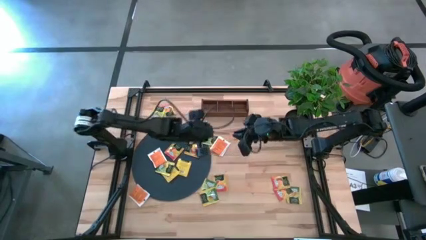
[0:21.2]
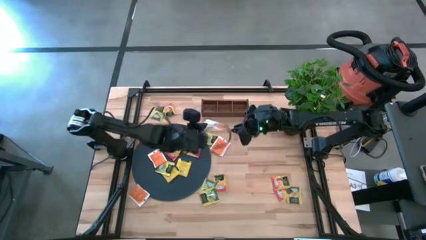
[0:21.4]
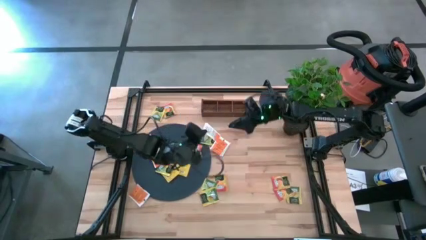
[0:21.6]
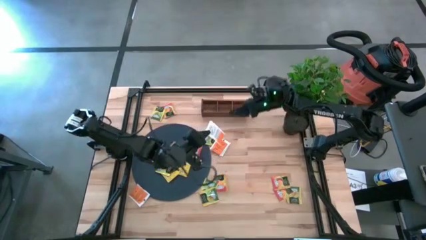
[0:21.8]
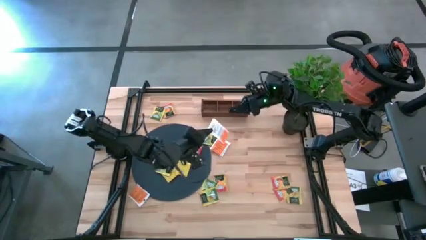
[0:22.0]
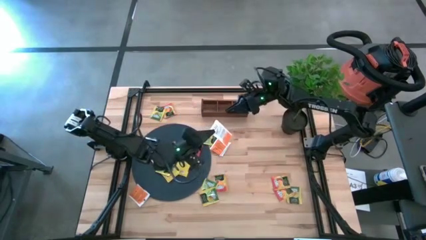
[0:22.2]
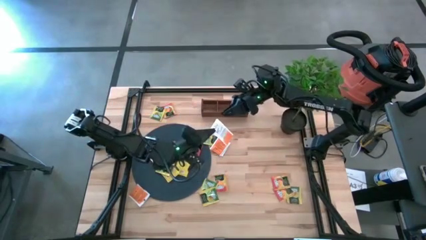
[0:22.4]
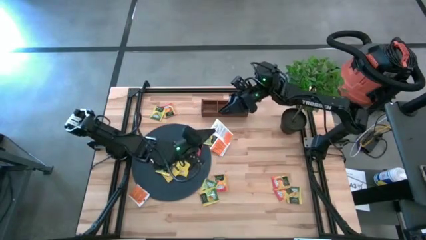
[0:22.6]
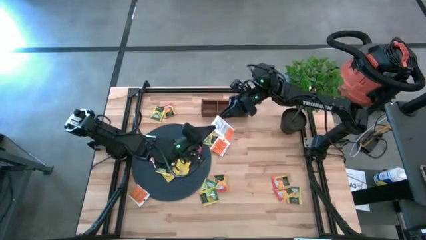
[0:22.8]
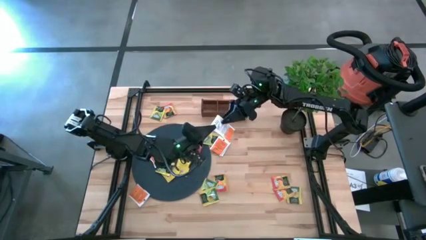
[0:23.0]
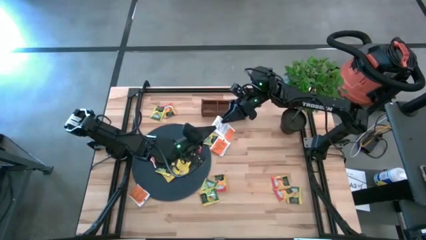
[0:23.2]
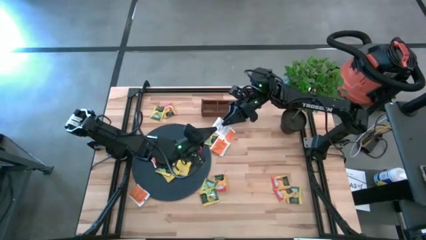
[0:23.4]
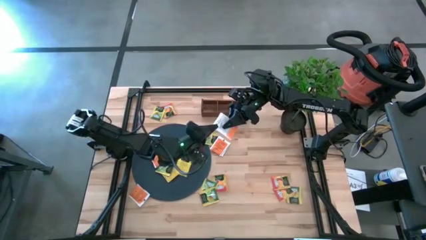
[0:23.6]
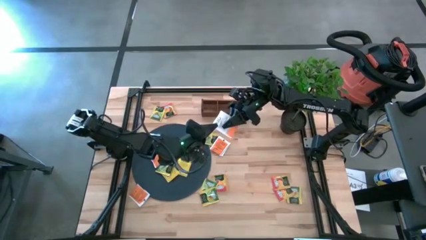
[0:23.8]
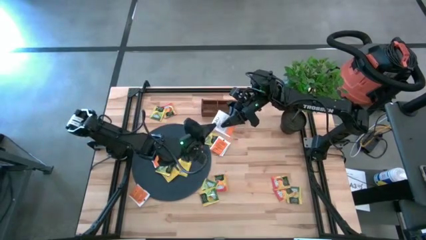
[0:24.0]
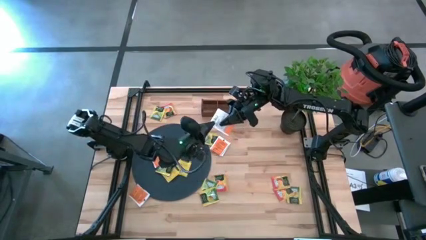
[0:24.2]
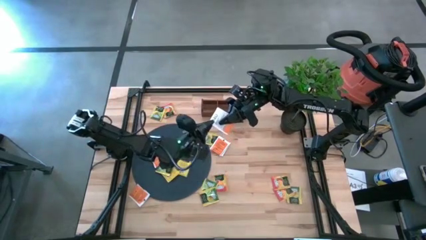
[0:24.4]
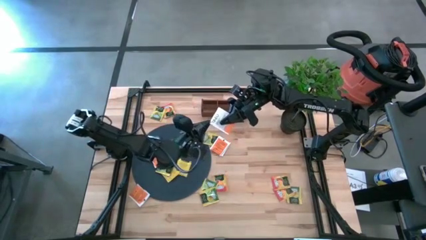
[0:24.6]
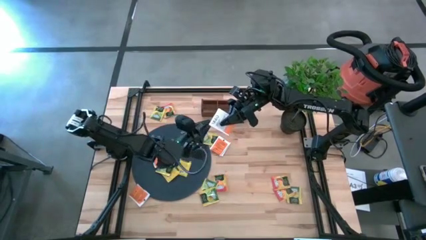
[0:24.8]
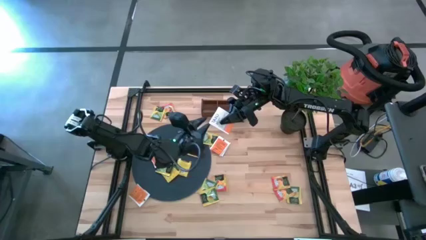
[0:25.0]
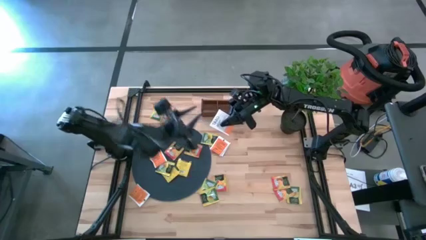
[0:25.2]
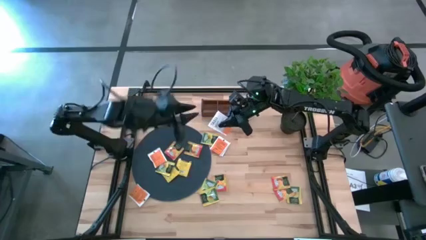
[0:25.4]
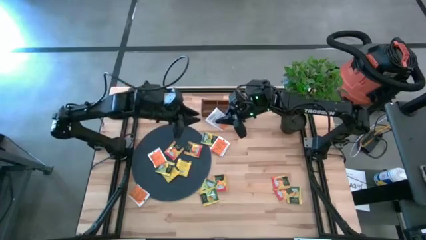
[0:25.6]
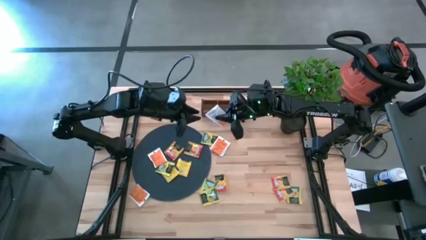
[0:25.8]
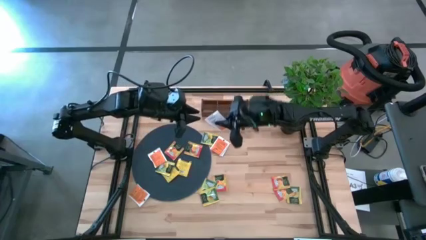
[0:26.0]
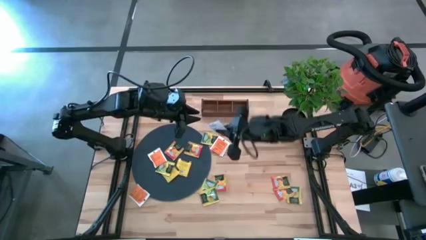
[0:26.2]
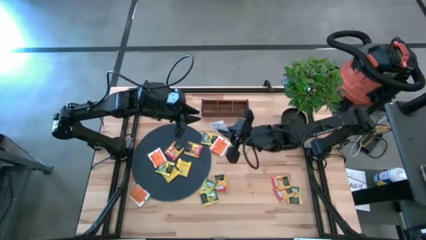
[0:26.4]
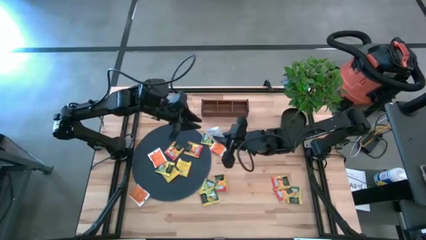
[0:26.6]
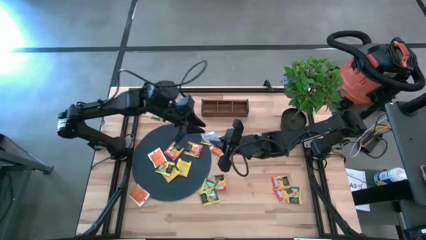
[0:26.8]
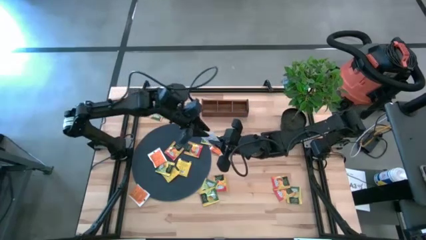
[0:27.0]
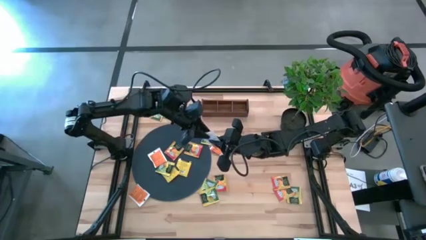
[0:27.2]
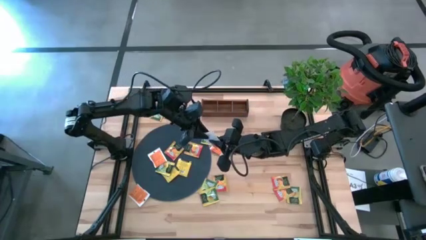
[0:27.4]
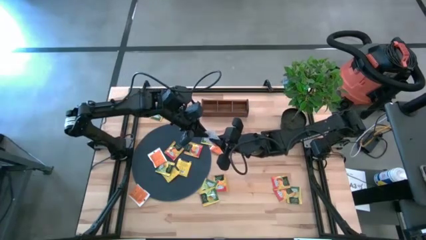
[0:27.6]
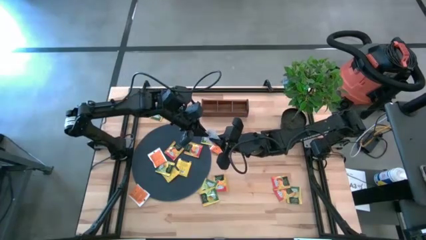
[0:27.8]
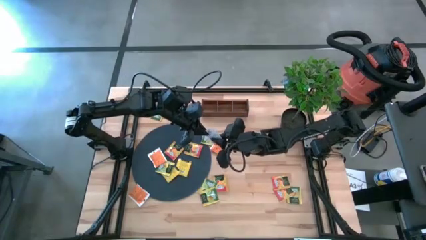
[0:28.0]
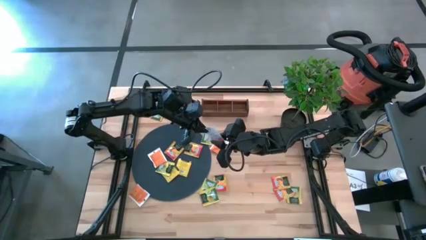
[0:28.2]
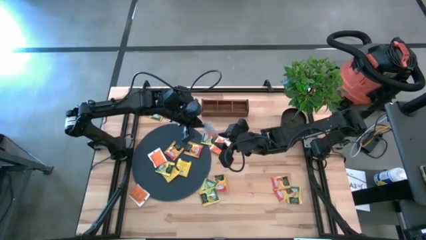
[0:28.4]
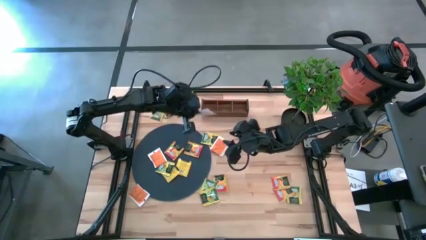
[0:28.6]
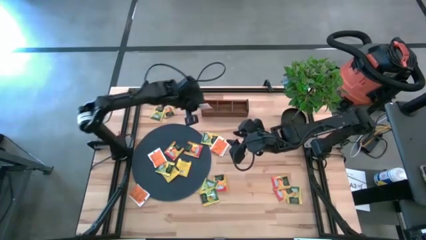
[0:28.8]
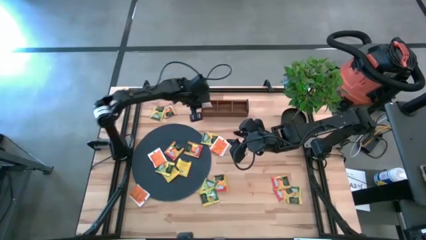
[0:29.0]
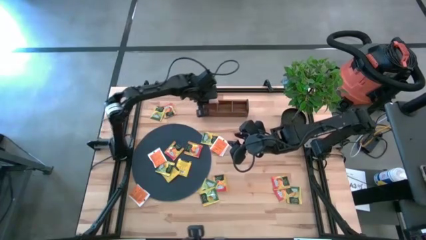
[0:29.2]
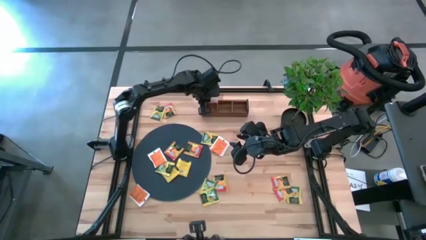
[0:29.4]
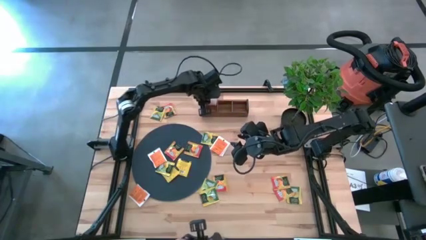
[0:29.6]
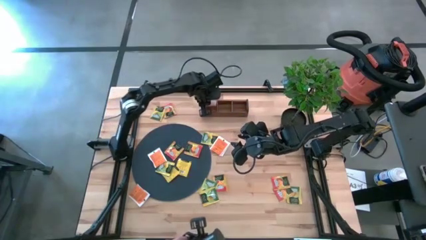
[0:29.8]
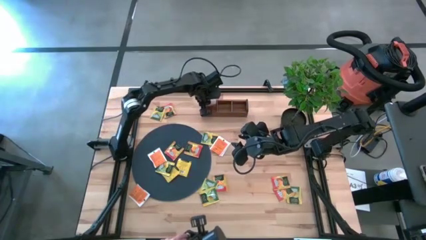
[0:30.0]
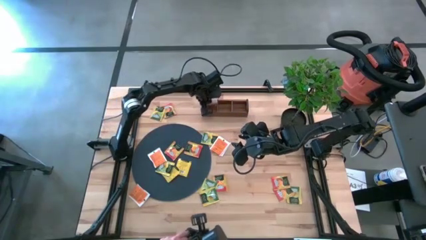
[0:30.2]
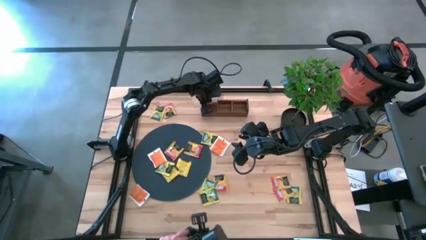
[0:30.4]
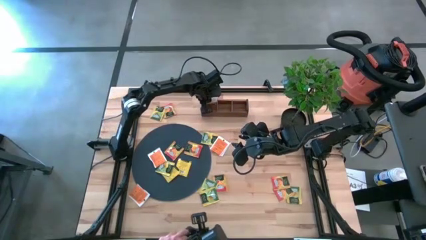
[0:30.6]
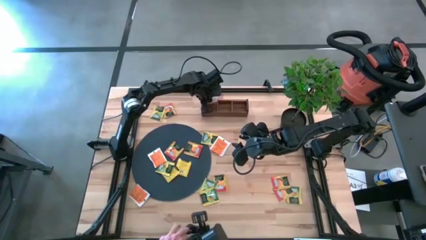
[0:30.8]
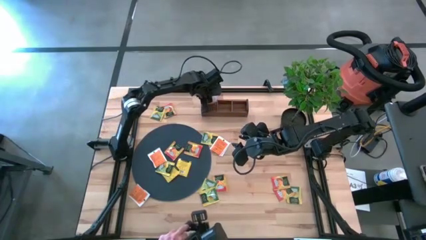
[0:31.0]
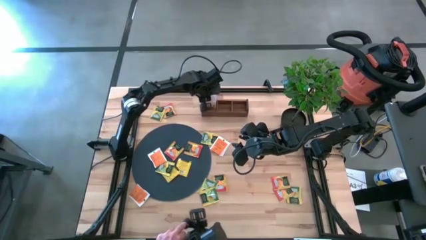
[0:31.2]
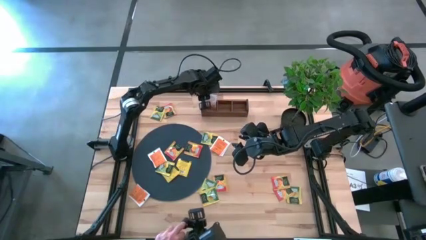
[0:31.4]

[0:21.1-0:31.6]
Task: Pick & Place Tea
Put the orange tea bag into the left section of the wooden organizer

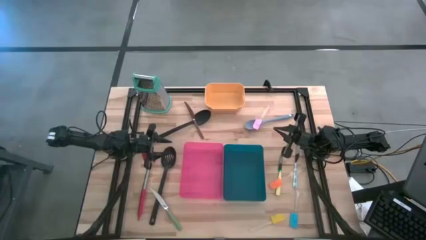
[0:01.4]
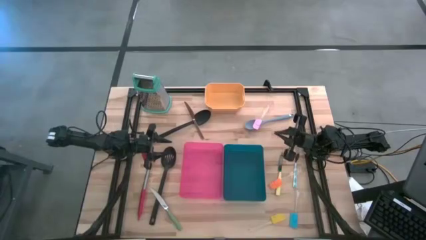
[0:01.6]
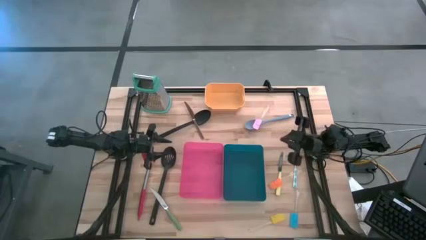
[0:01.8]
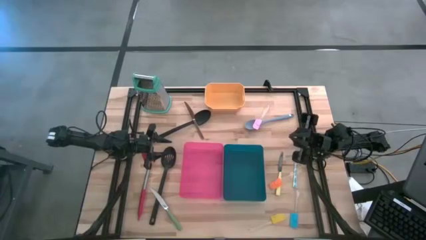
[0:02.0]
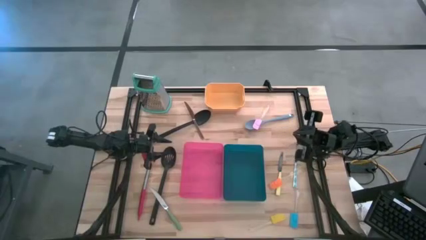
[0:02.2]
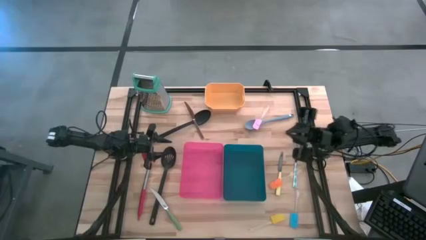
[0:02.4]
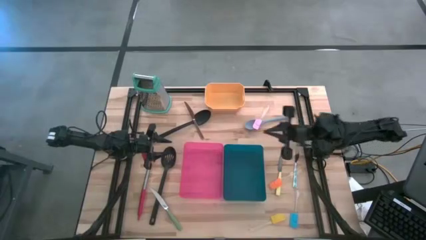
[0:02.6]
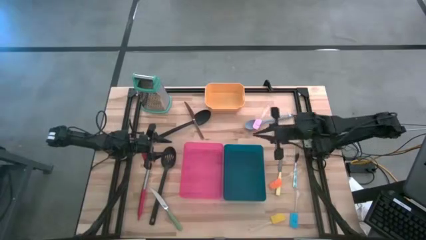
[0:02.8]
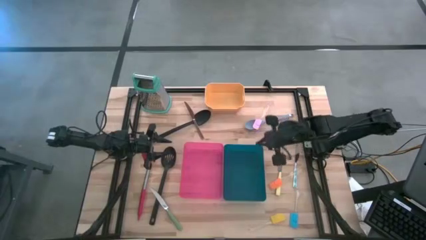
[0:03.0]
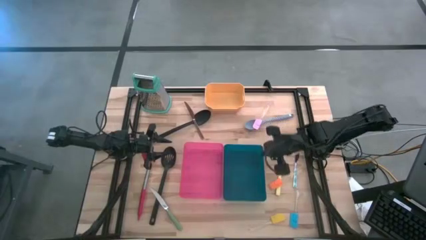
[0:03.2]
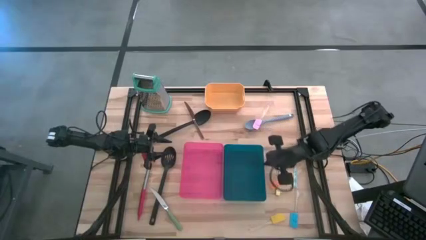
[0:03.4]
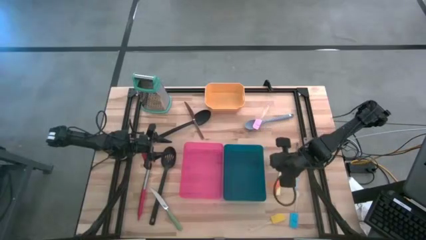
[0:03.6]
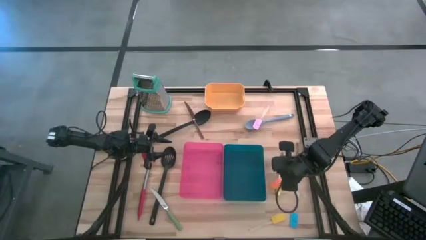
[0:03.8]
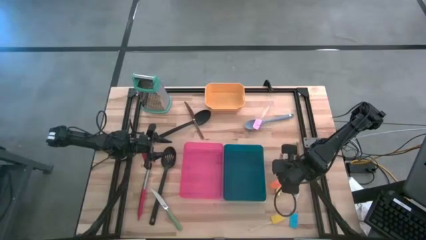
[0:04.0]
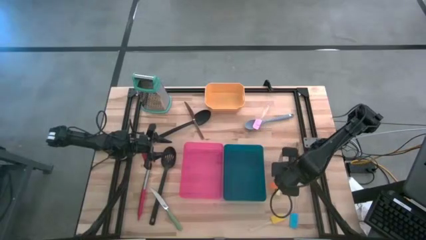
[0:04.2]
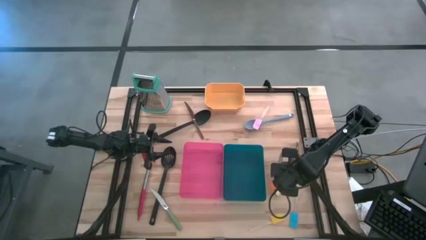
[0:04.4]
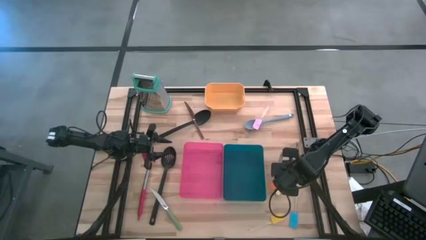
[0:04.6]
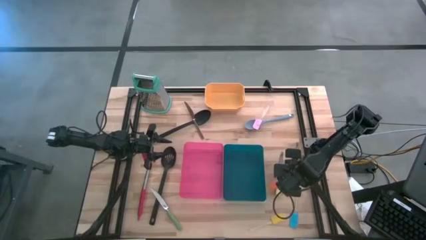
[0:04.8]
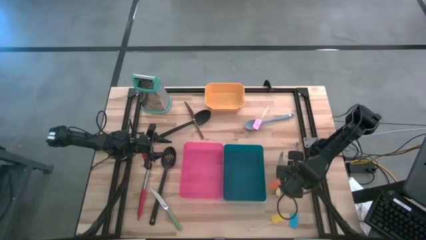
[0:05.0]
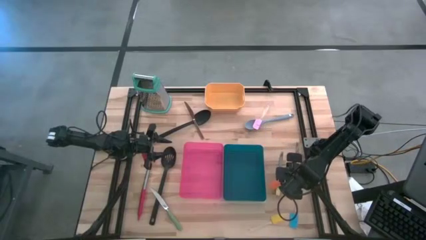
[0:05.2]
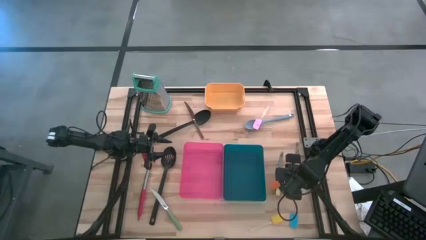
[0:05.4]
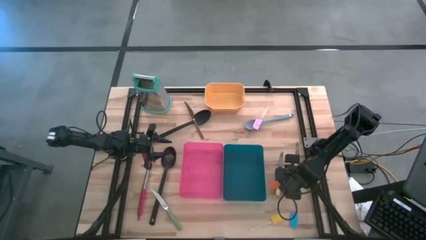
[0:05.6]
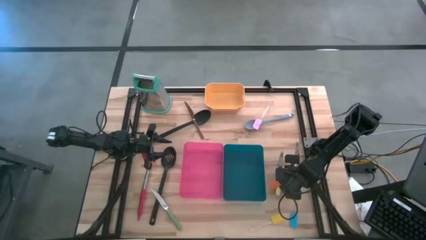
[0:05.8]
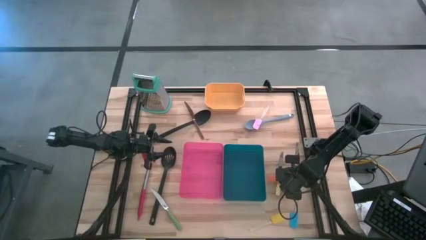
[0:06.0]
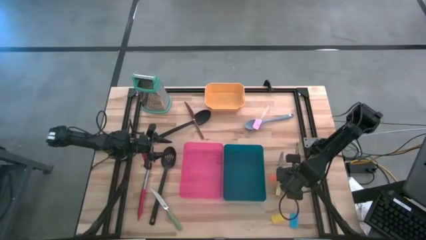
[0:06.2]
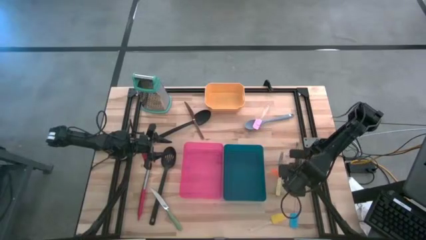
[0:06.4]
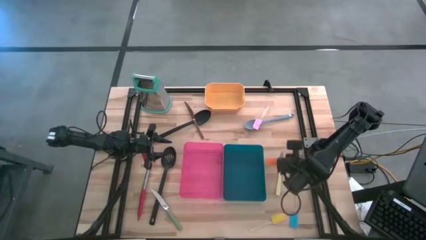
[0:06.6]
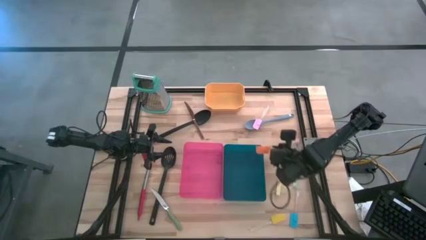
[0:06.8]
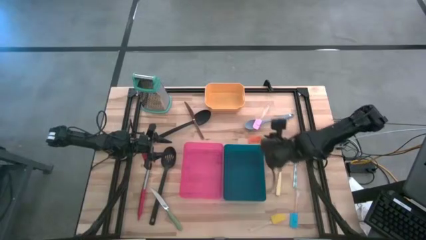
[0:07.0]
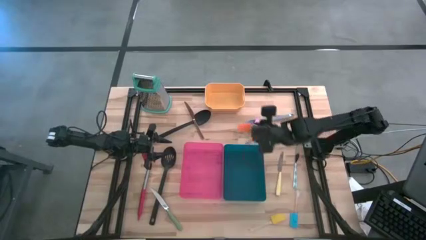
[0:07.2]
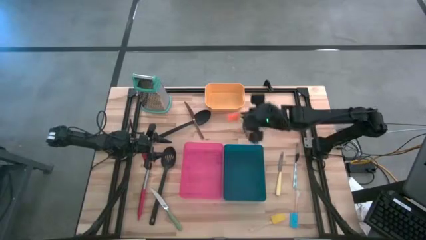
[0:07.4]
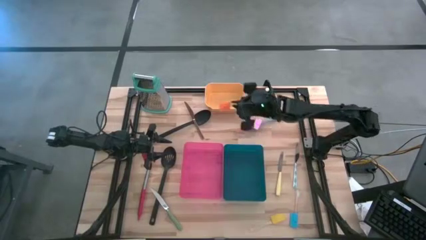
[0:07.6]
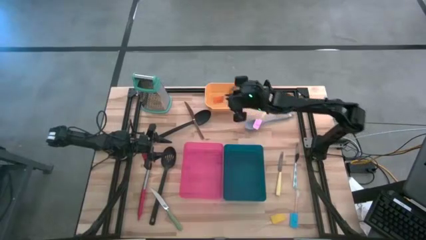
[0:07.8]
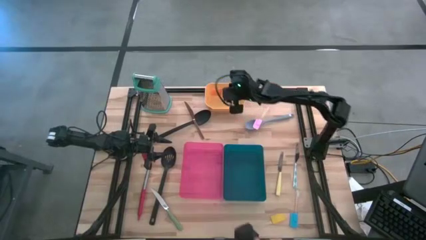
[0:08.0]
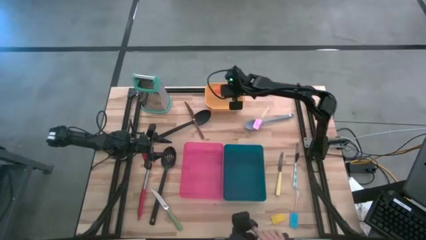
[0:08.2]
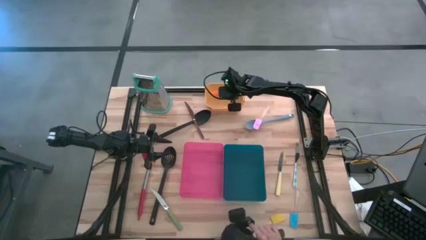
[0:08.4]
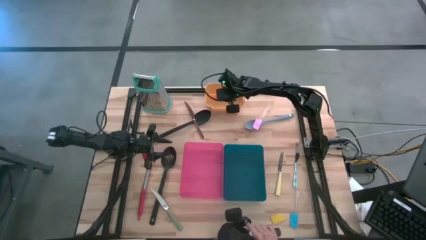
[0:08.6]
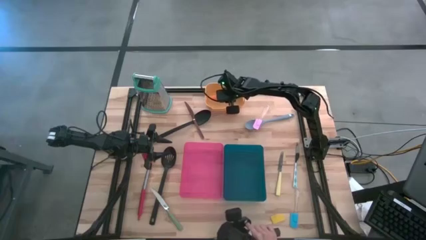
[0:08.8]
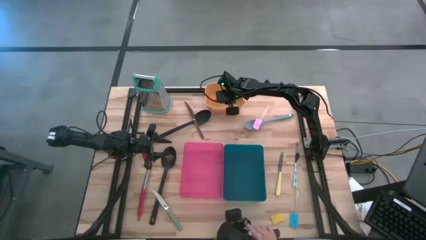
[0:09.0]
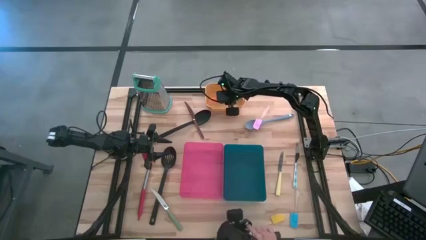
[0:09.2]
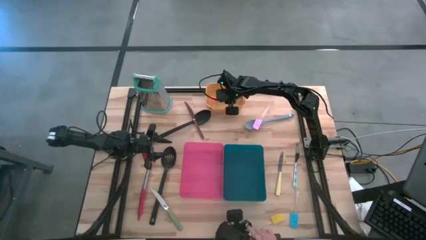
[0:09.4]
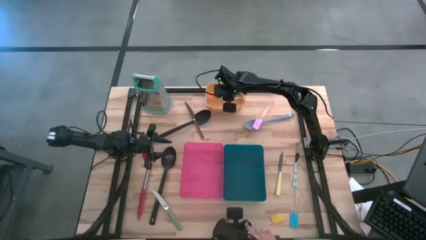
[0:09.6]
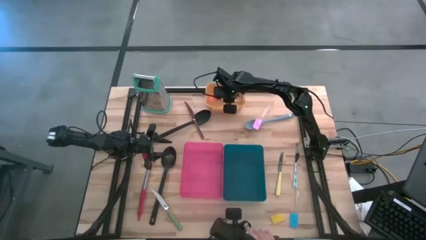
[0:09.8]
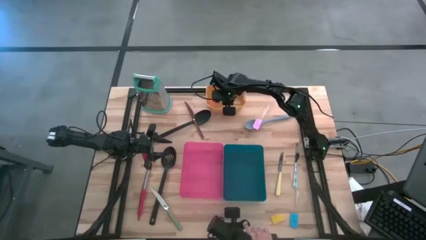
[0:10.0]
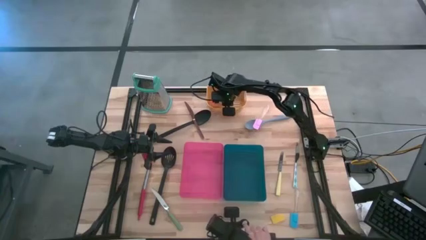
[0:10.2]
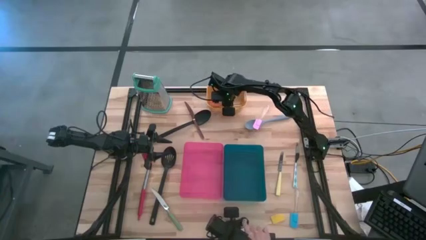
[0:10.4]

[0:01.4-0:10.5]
Task: Pick & Place Kitchen Items
Put the orange spatula into the yellow bin
